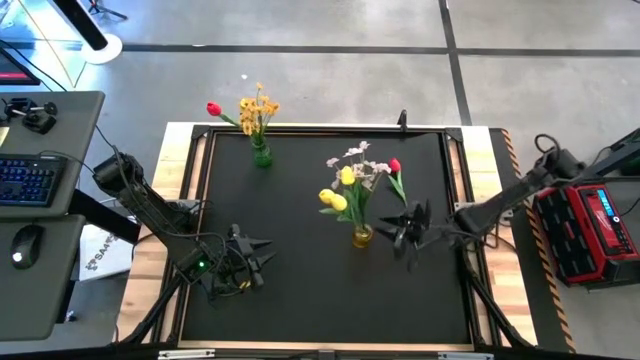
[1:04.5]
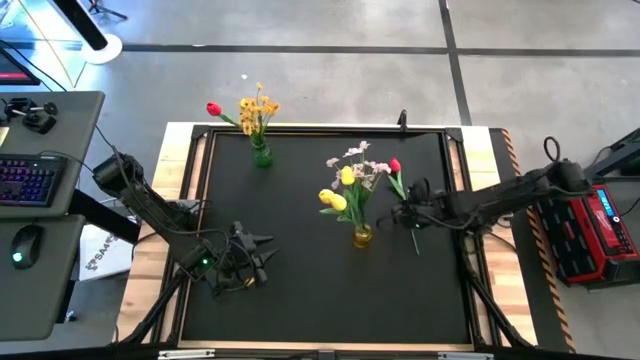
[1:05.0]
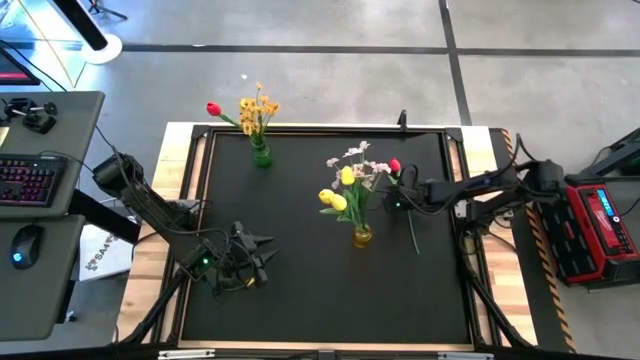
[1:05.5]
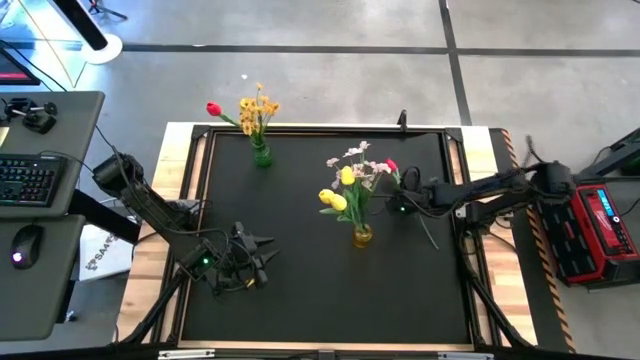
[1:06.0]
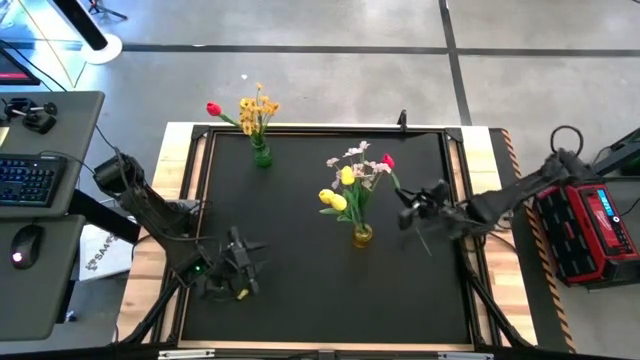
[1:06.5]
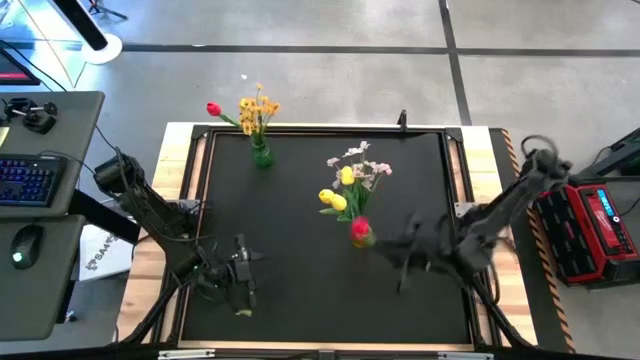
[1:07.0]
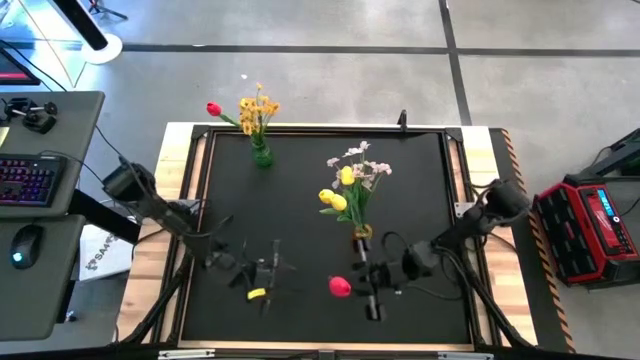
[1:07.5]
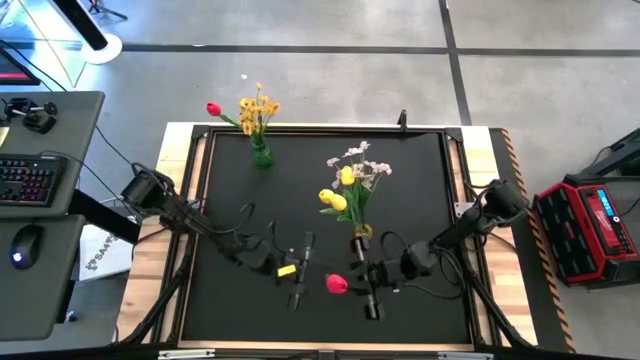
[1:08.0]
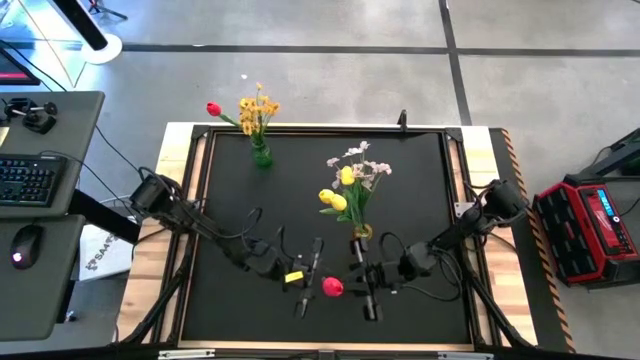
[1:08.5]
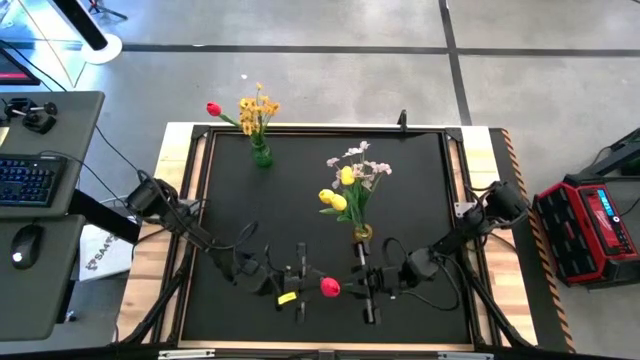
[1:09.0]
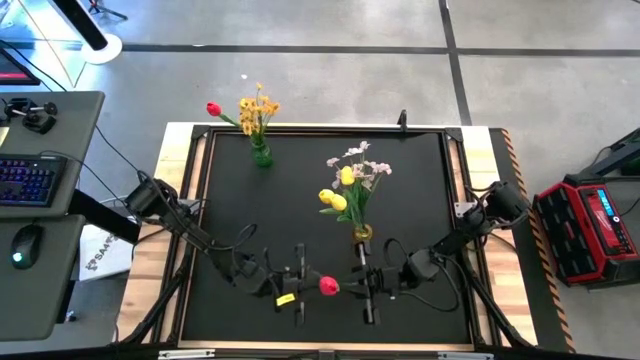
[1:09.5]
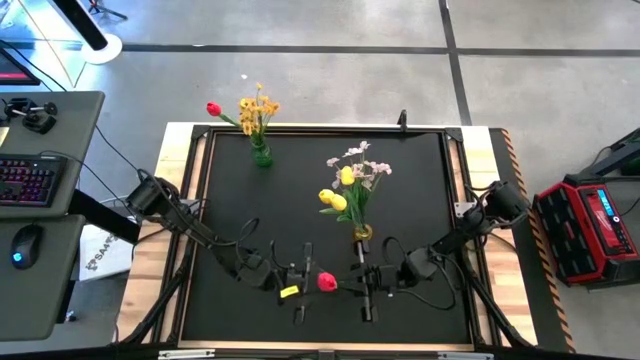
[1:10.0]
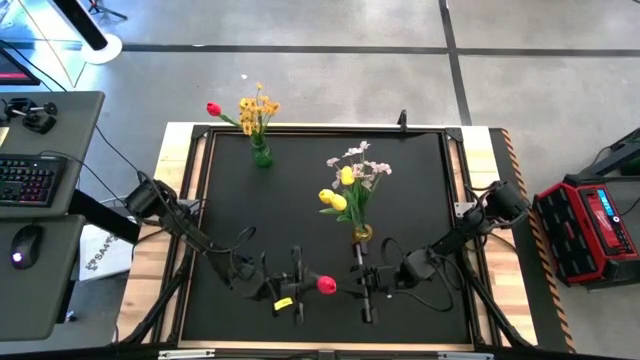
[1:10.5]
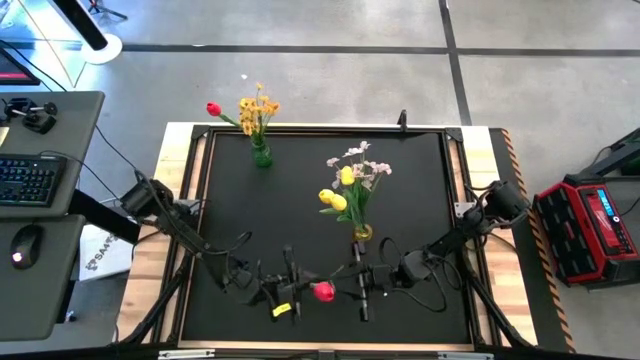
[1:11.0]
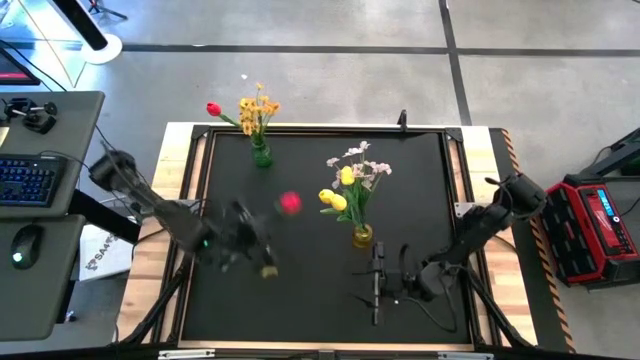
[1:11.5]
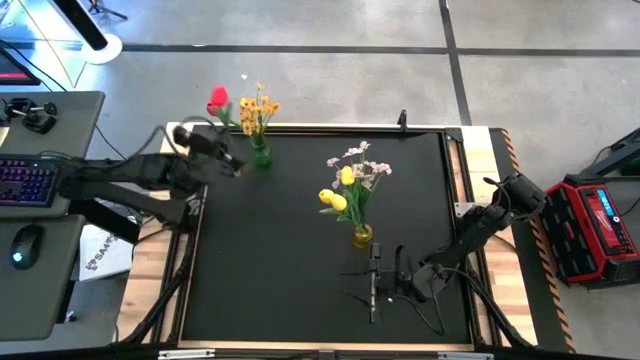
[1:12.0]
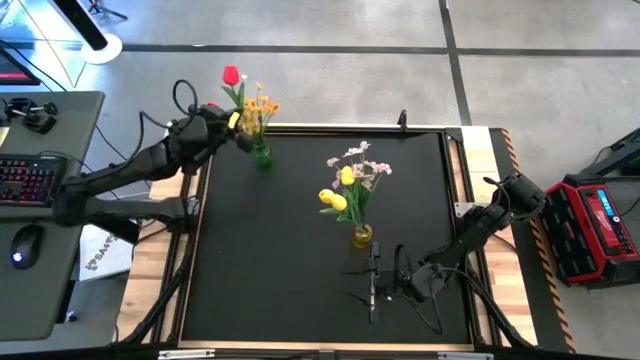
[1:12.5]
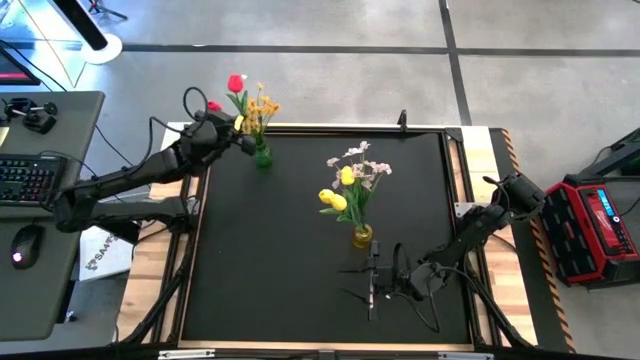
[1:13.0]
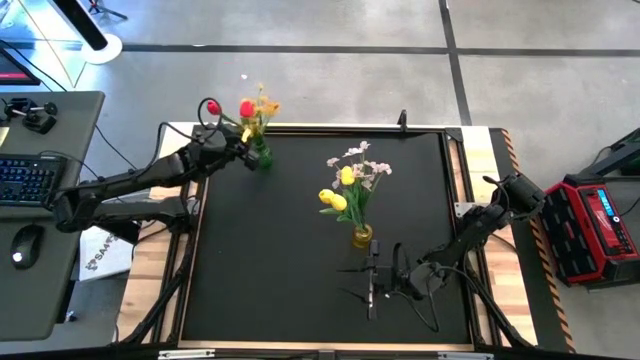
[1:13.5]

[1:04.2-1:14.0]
Task: Sort flowers into vase by color
Put the red tulip into the green vase

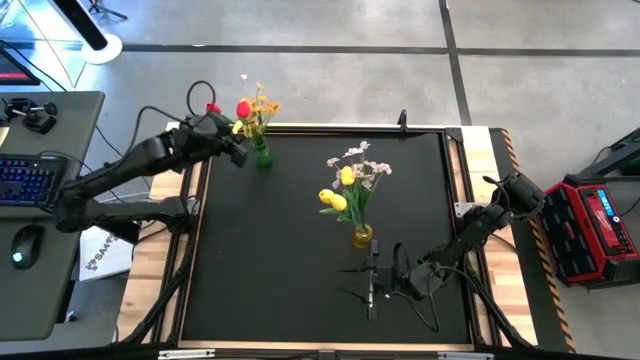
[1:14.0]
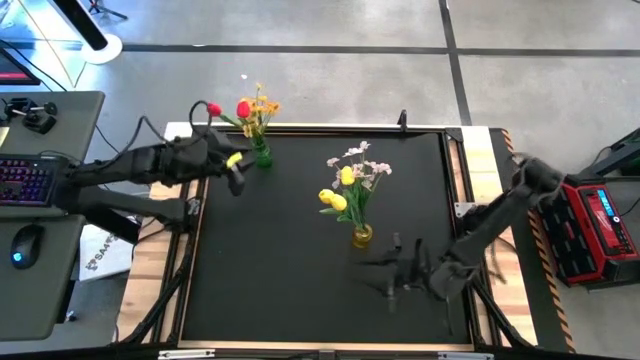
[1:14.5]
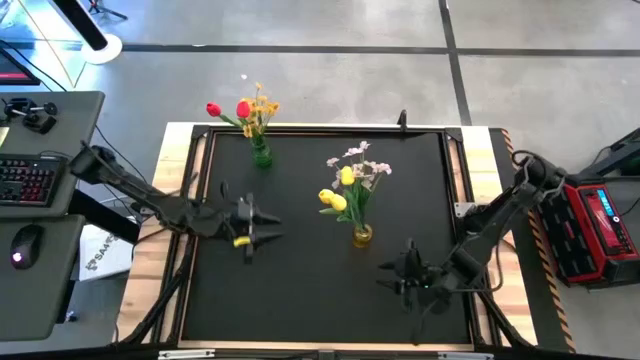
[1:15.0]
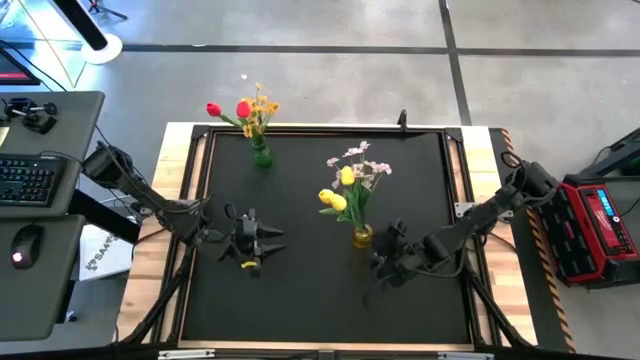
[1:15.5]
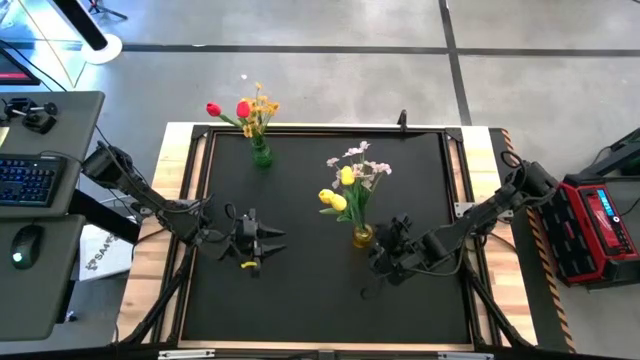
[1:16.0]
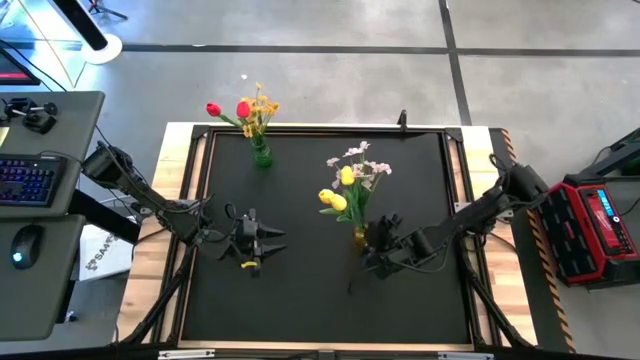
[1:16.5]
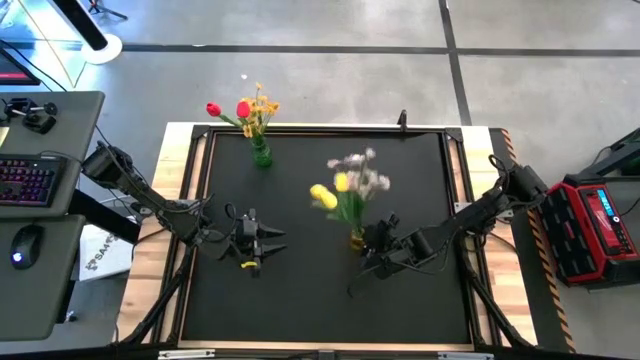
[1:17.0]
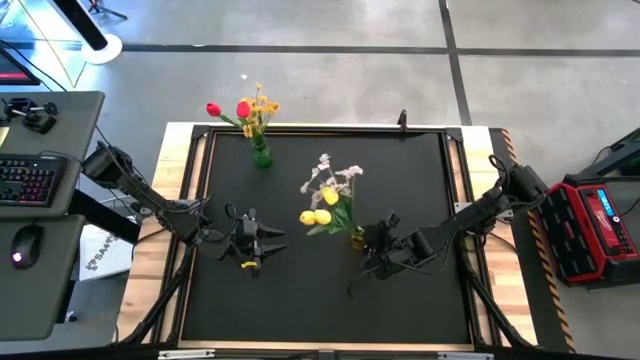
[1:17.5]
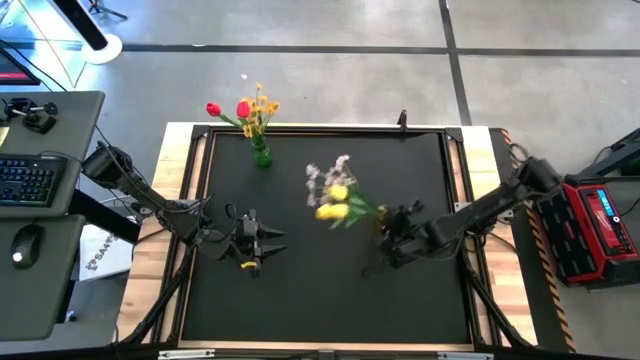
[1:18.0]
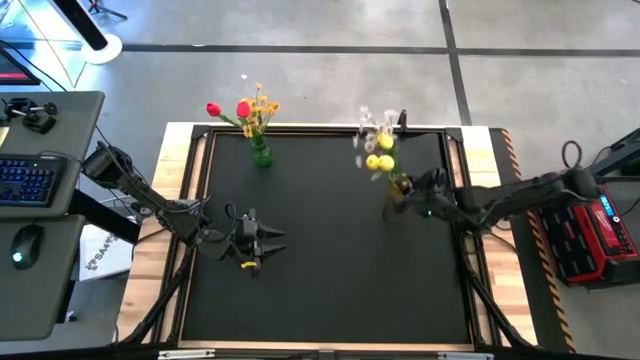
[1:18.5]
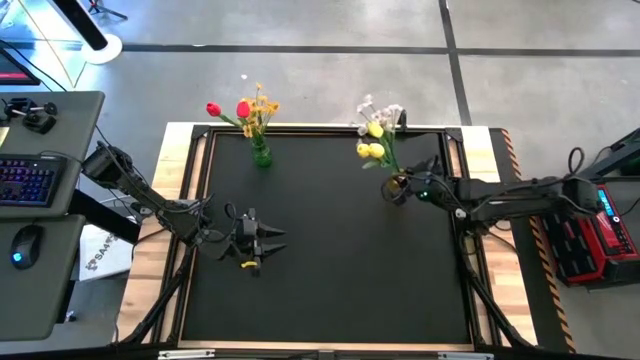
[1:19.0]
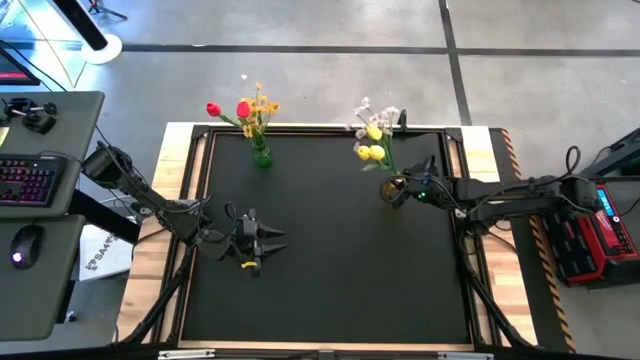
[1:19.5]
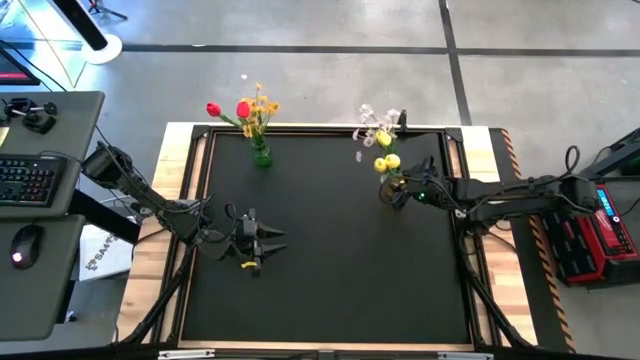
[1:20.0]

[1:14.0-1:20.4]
Adjust the yellow vase

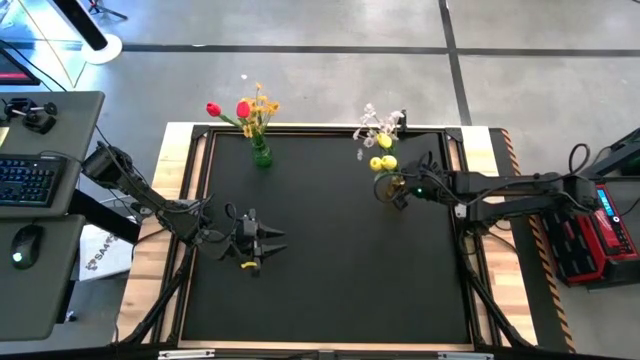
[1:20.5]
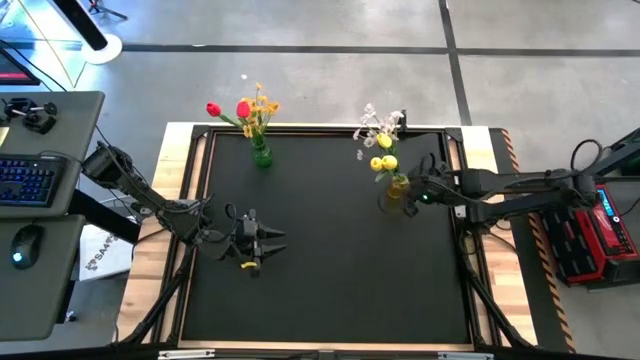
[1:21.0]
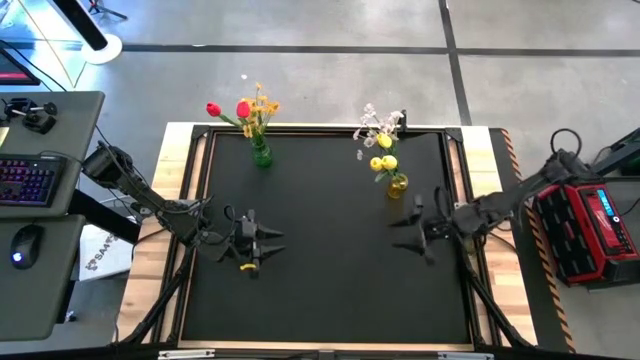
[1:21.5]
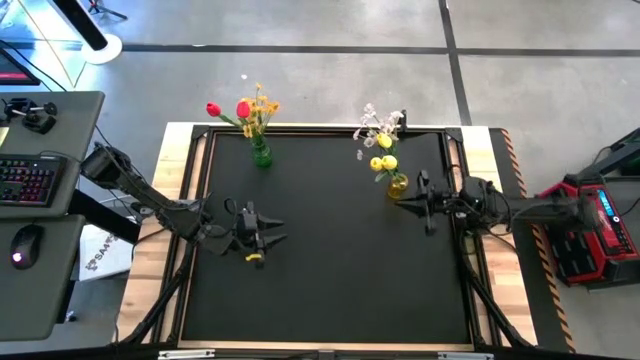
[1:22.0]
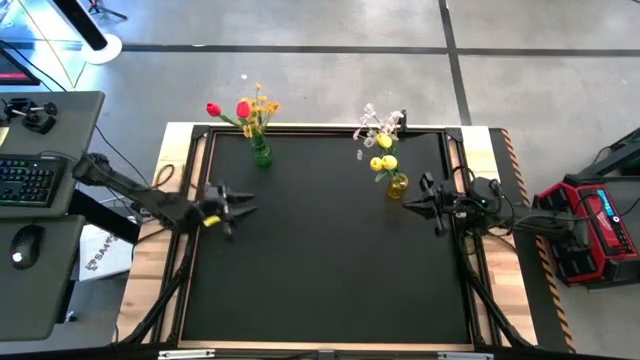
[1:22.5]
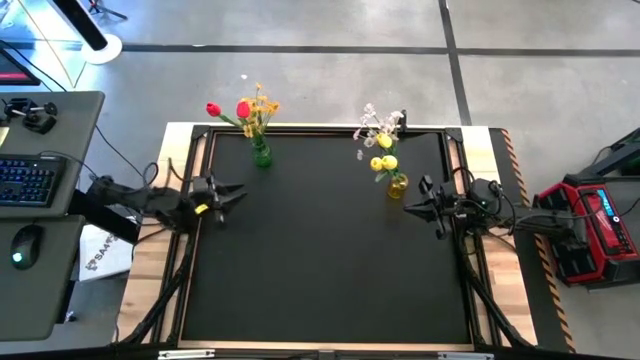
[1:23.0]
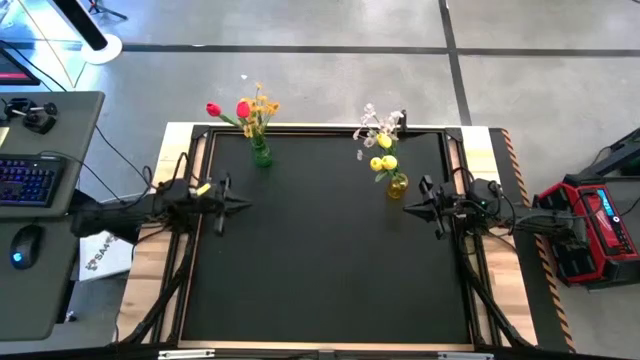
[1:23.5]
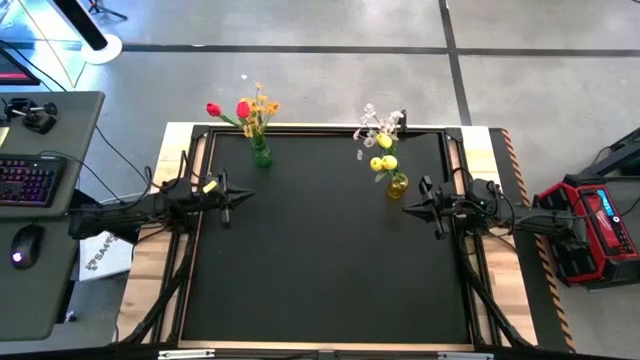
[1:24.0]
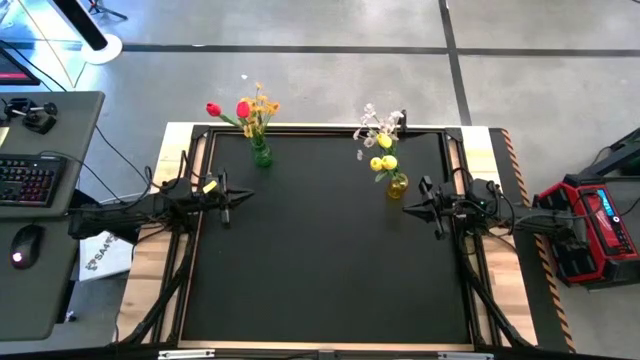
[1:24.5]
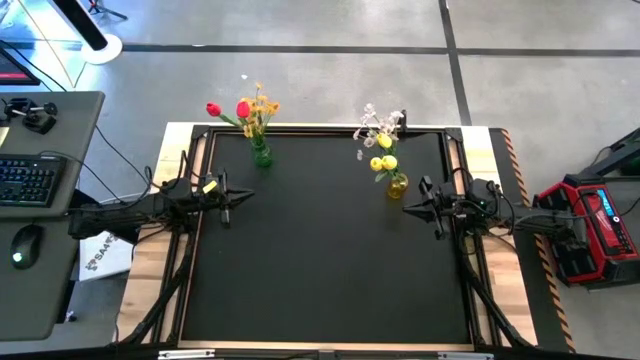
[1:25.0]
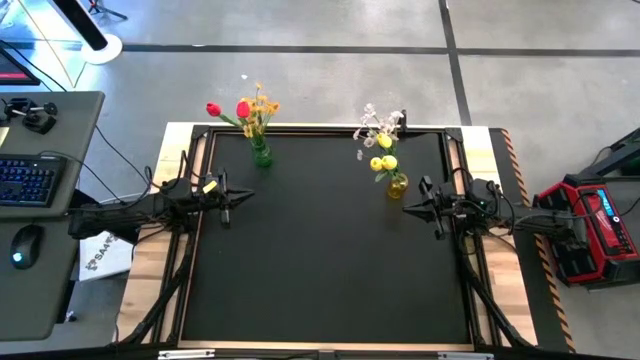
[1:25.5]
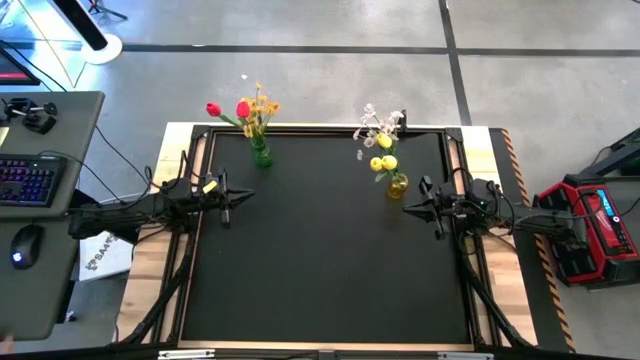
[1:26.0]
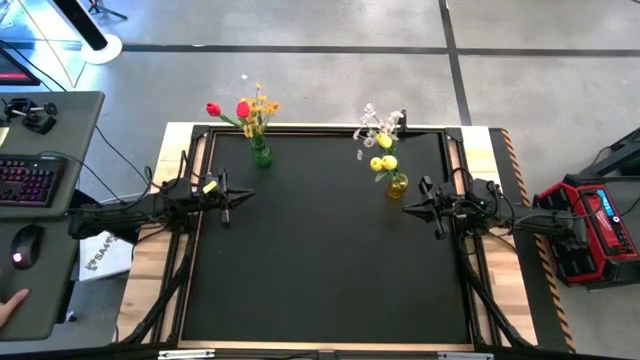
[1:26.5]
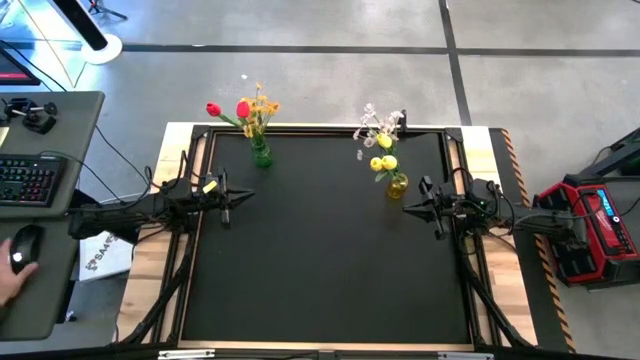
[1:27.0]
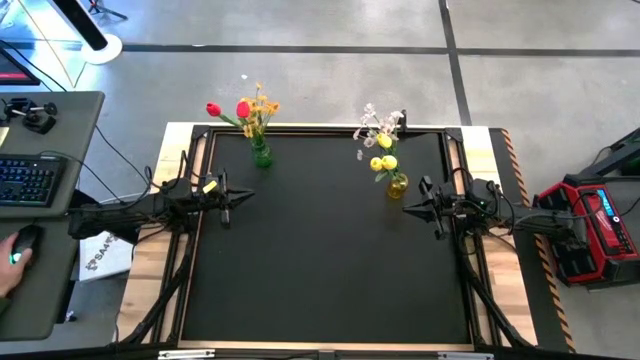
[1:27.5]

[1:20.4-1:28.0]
Return to Home Position
